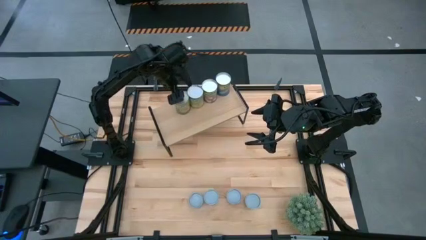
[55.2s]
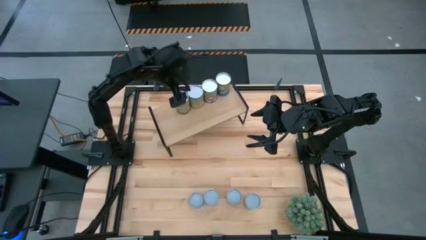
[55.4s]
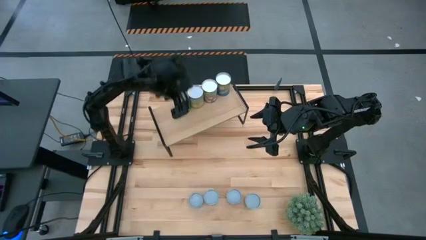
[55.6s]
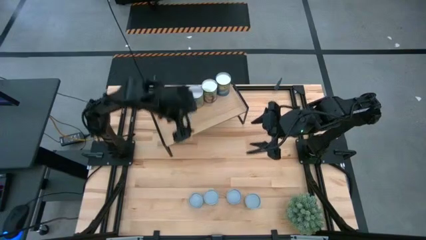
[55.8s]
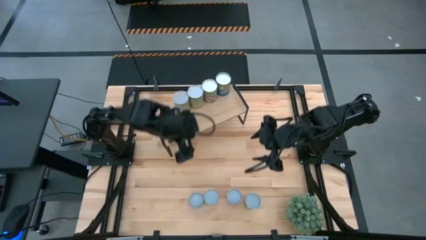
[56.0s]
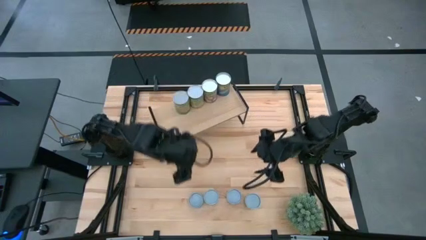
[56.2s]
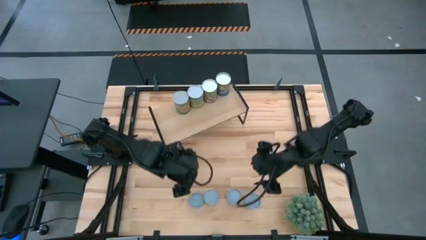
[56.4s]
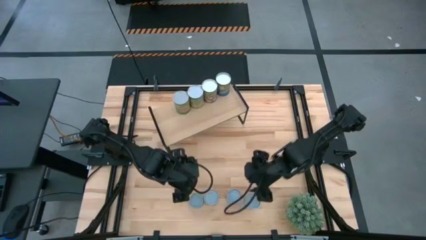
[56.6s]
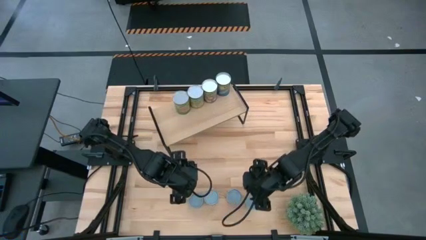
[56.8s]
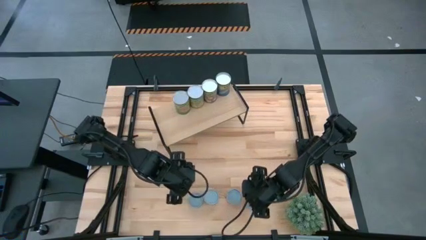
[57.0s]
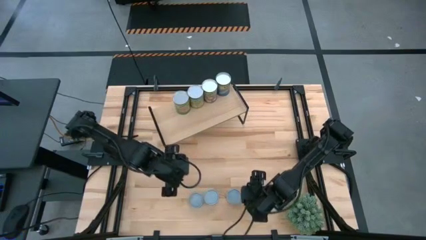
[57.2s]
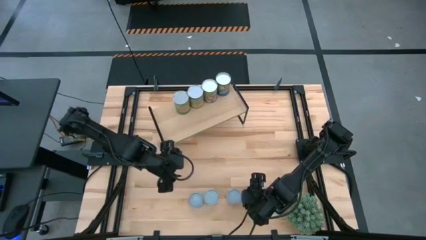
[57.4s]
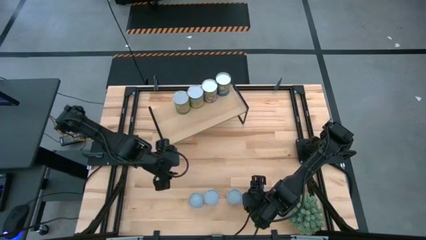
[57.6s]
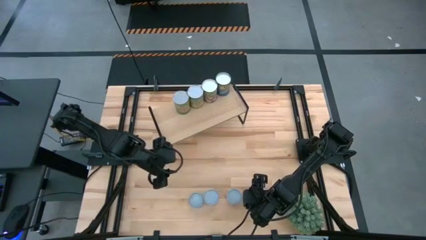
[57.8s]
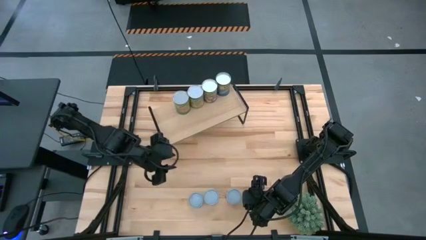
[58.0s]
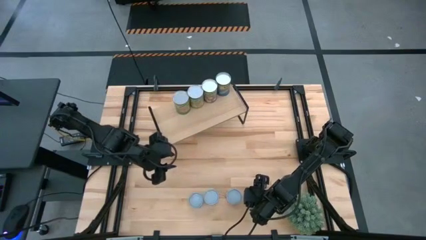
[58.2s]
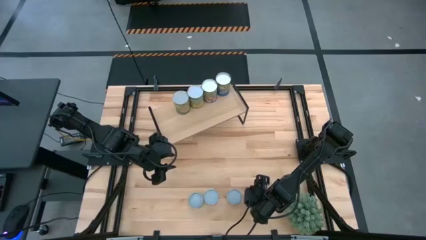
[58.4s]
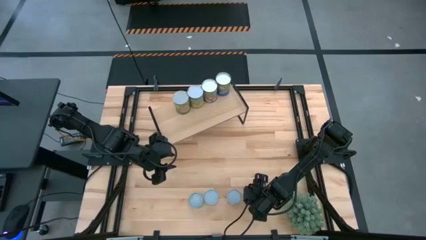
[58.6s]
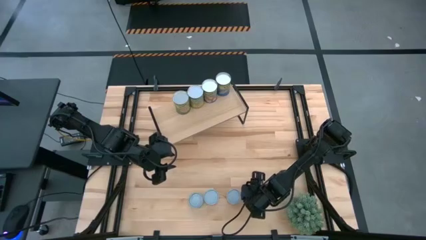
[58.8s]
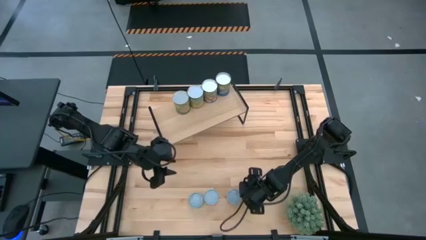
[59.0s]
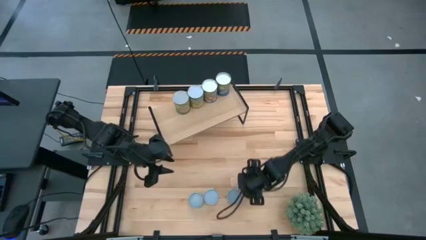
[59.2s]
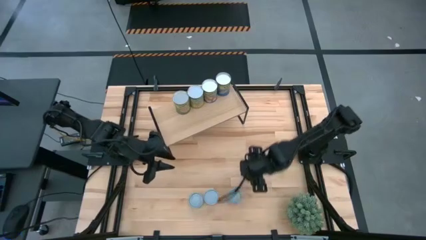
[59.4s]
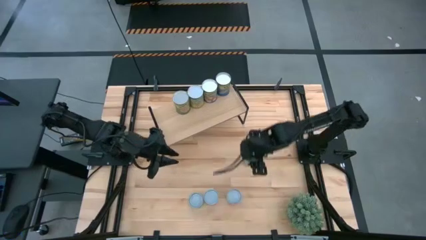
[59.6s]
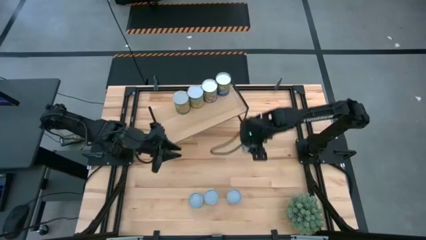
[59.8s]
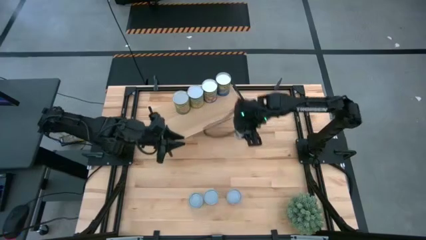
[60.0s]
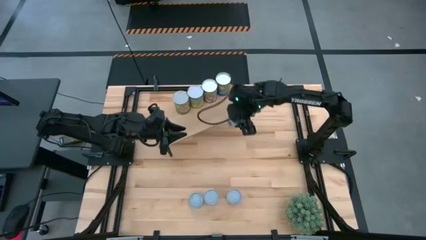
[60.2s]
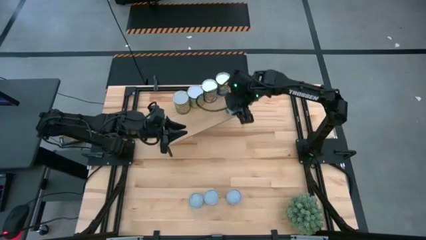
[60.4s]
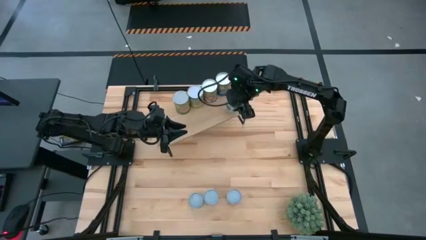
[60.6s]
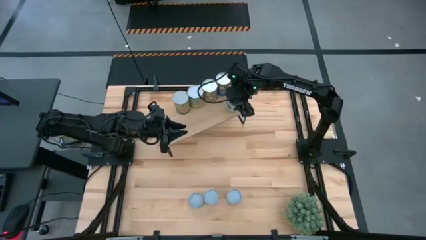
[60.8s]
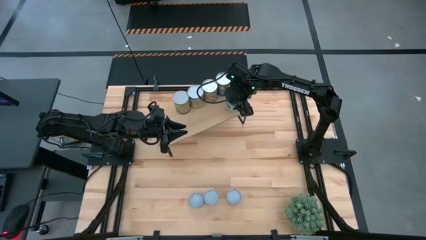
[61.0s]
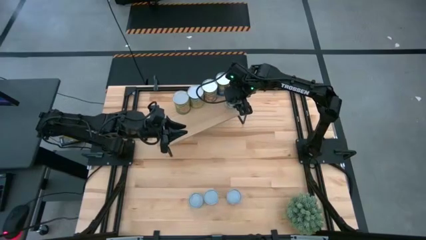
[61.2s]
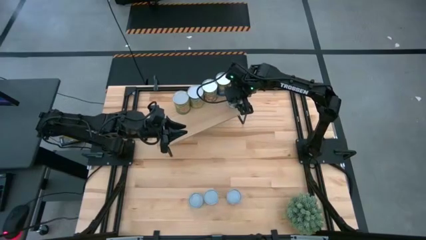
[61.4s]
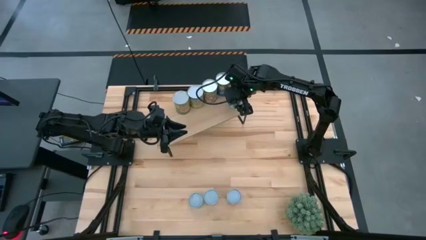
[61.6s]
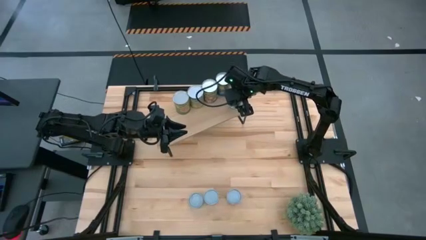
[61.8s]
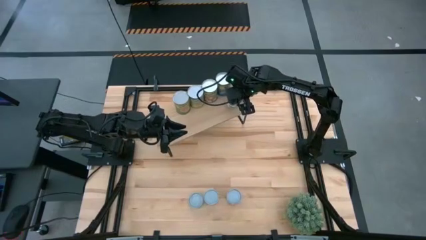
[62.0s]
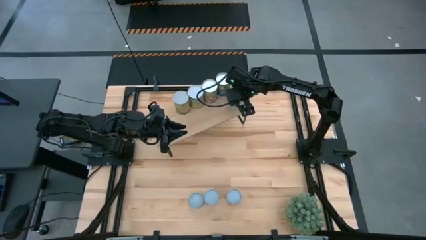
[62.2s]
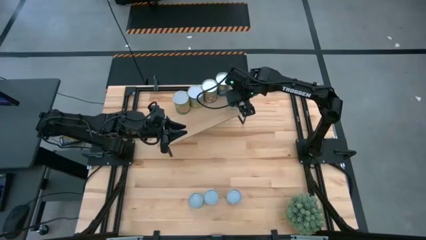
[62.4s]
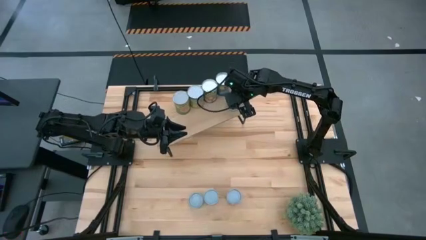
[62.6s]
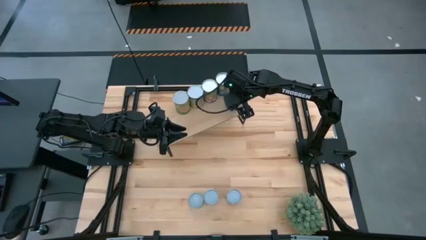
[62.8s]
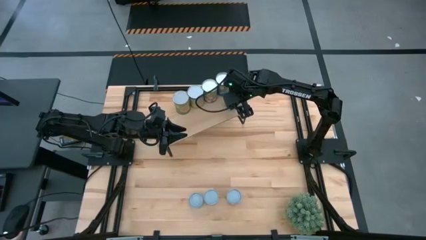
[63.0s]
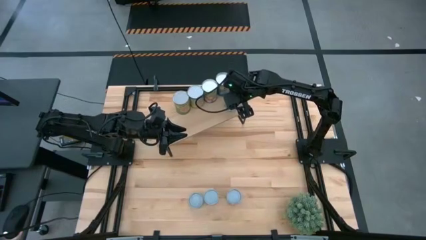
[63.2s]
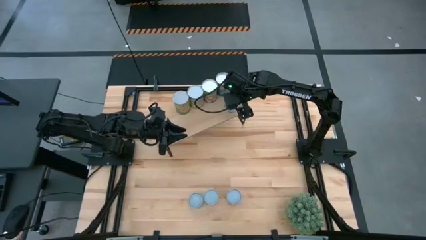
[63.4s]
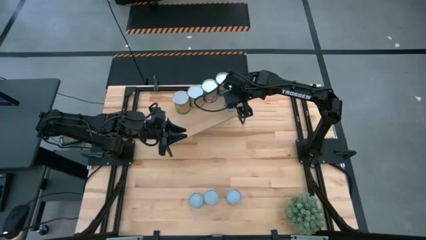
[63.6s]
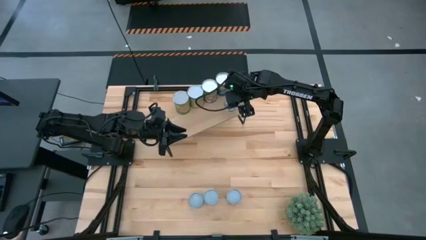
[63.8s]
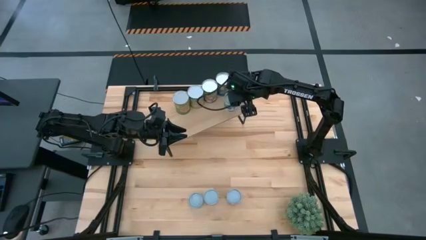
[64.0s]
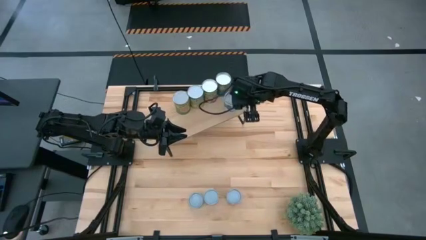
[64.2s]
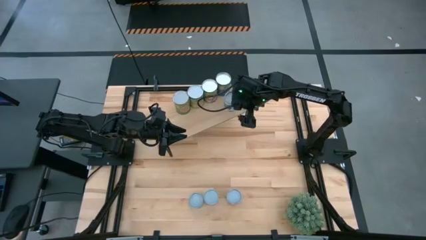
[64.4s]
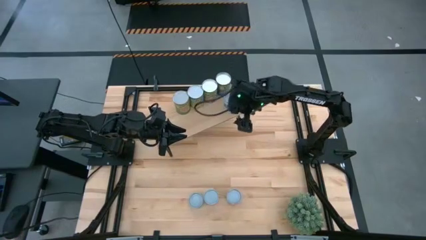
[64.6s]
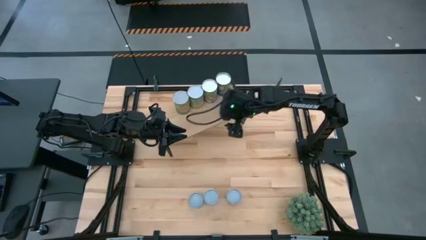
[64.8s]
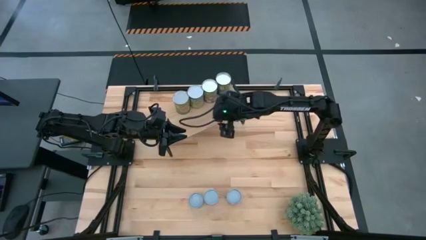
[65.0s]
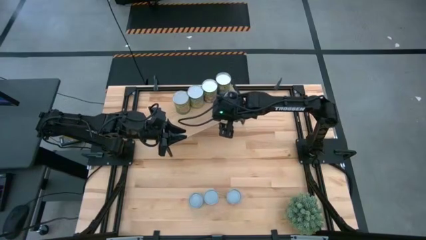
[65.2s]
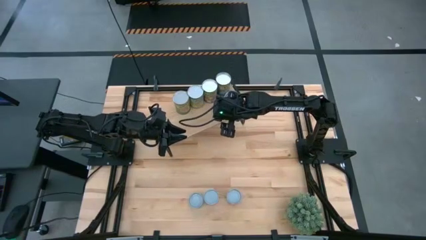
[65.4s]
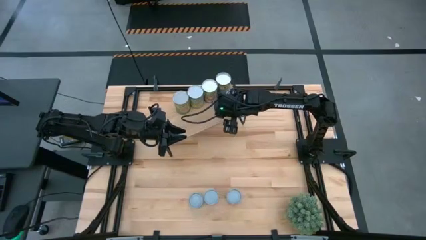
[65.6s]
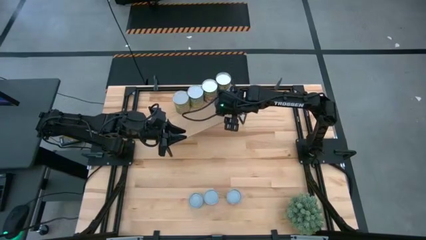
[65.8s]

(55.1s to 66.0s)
Task: Pick and place cans onto a shelf
Put the canned mixed vegetables on the shelf

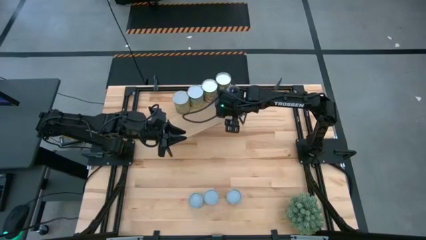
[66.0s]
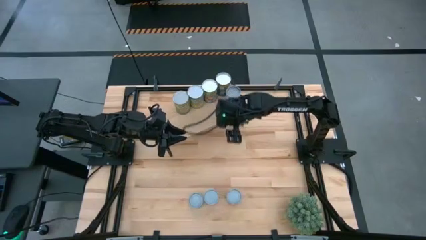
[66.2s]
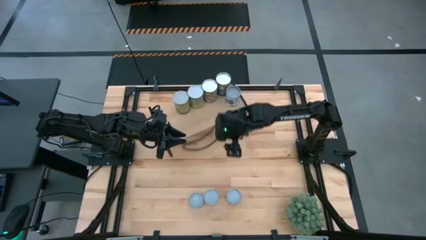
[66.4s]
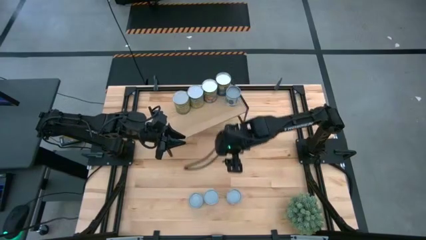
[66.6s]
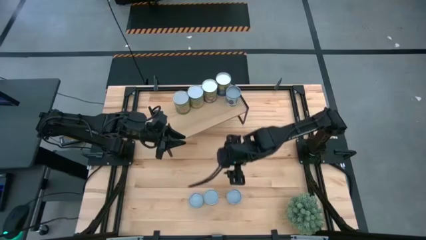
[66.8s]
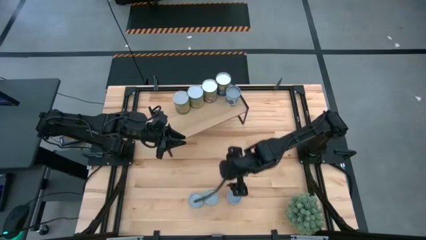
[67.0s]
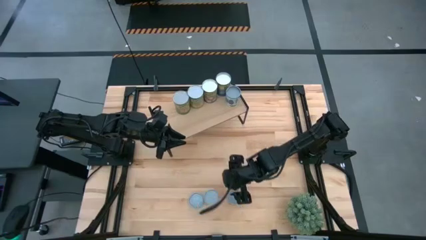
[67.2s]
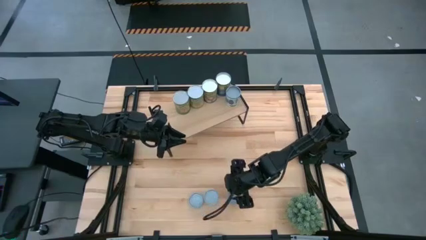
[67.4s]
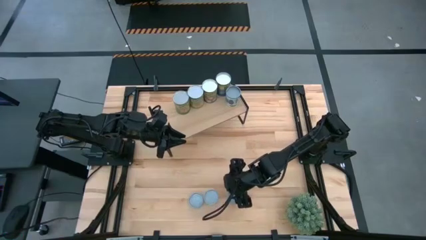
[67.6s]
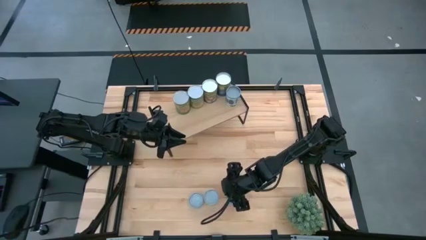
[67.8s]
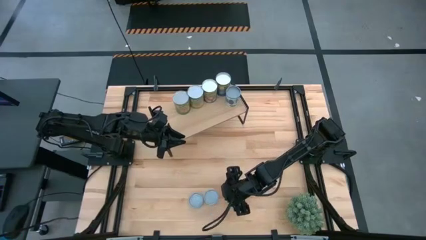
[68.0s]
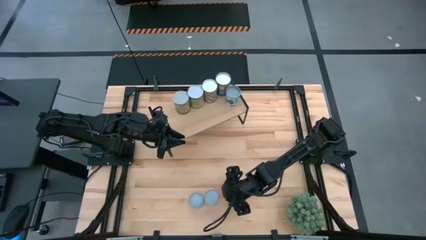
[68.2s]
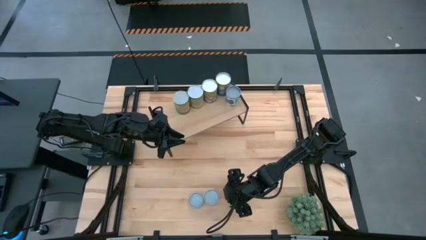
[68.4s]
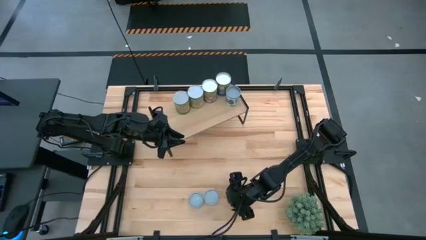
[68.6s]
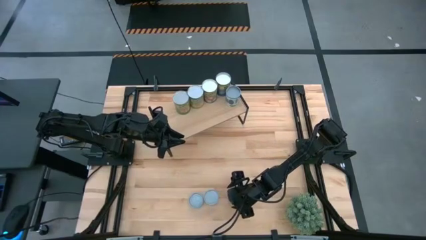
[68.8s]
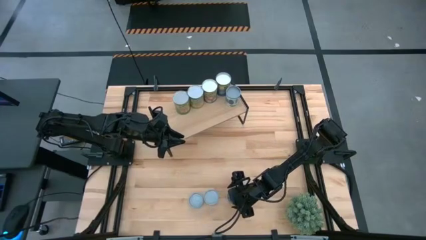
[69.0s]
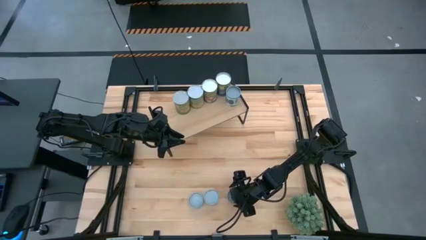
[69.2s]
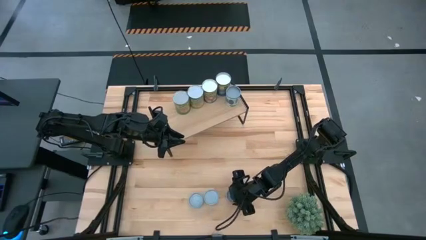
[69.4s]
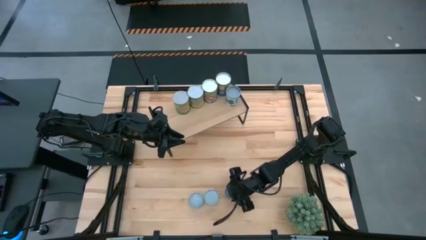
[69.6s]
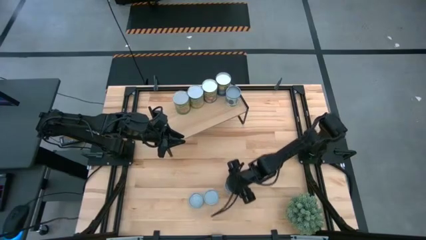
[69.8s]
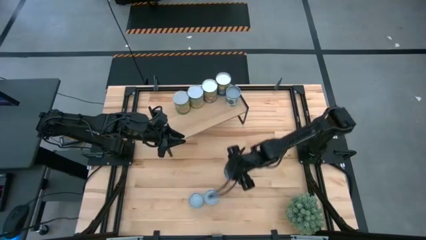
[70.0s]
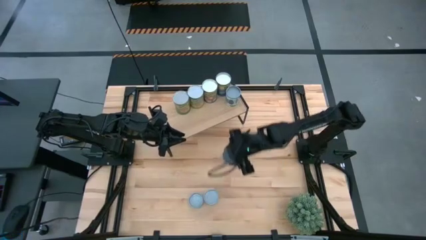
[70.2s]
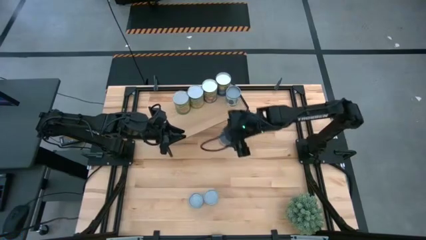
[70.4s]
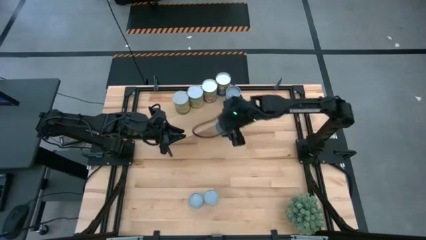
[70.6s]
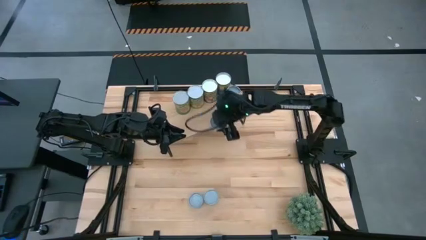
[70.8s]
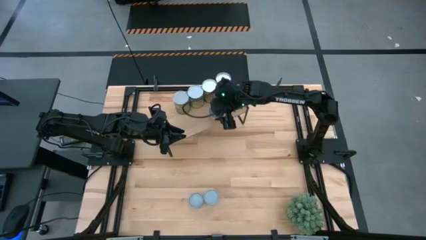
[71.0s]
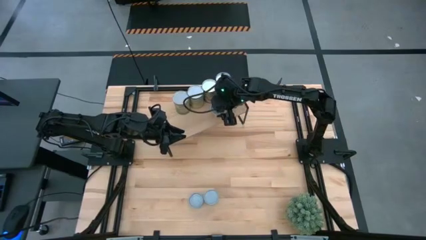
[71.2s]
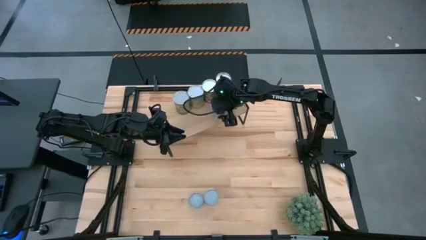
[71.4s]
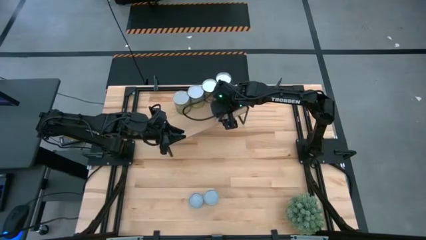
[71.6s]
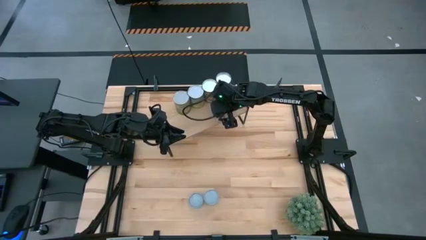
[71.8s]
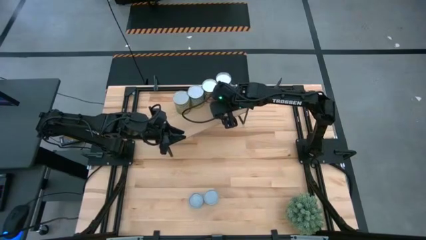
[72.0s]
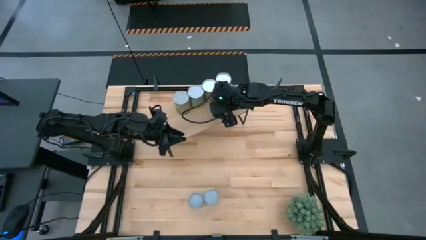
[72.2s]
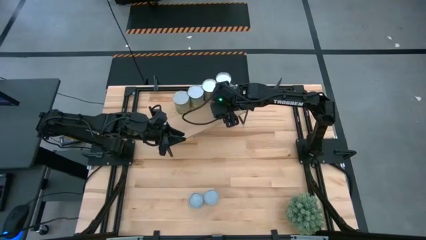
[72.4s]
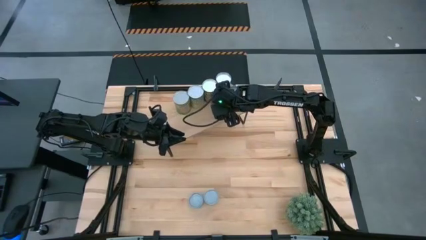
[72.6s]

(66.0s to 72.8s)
Put the canned diced tomatoes on the shelf
